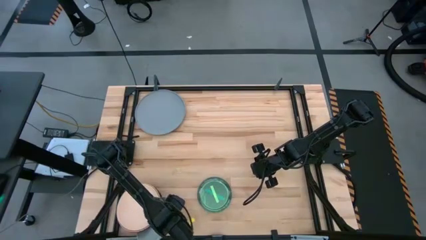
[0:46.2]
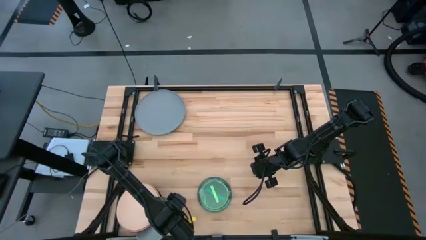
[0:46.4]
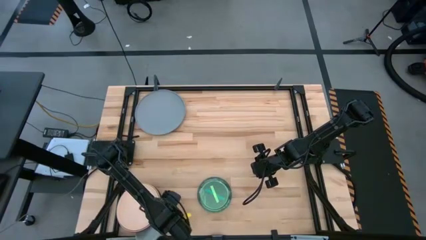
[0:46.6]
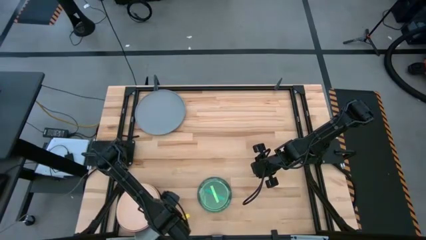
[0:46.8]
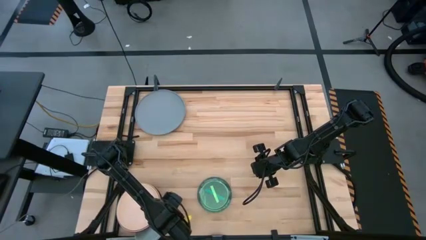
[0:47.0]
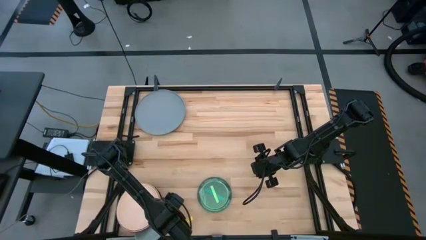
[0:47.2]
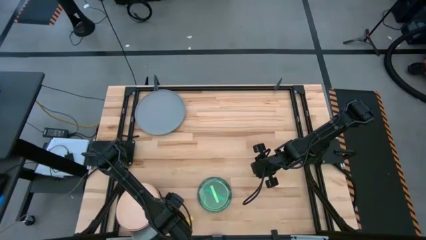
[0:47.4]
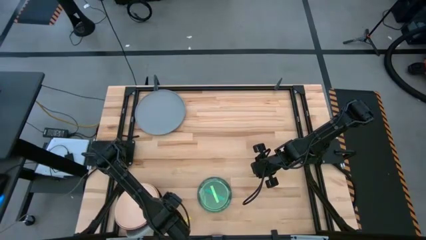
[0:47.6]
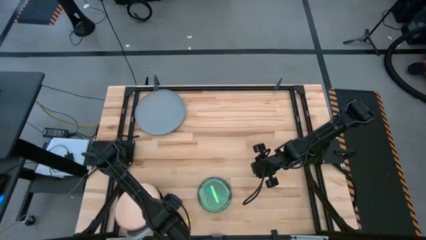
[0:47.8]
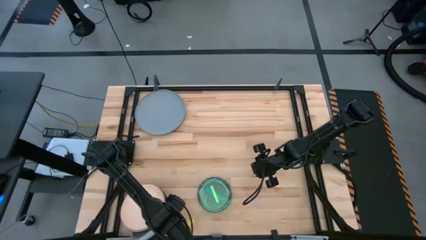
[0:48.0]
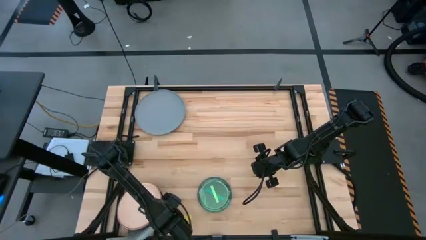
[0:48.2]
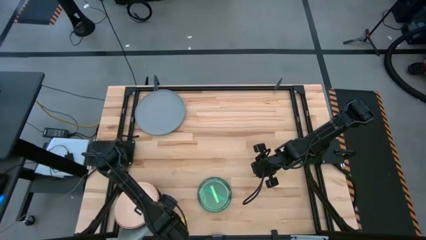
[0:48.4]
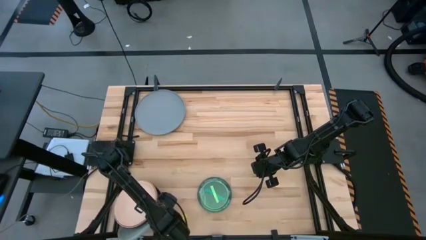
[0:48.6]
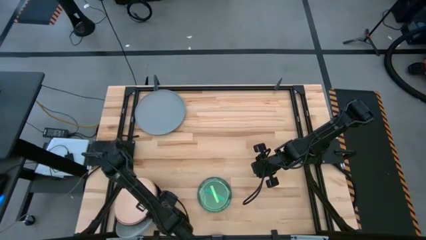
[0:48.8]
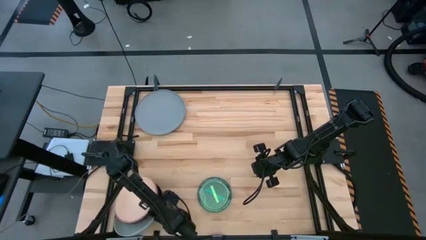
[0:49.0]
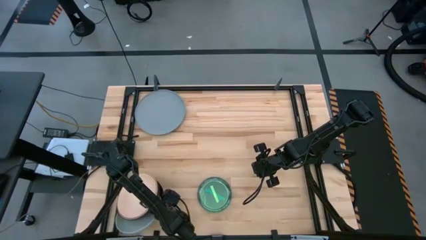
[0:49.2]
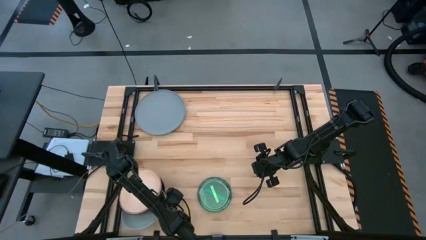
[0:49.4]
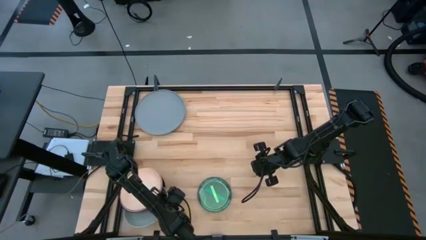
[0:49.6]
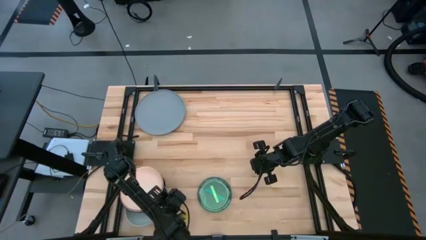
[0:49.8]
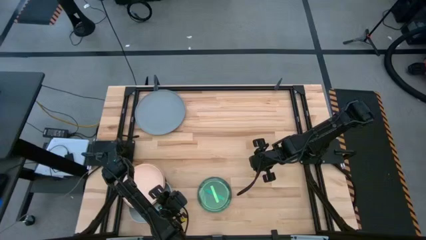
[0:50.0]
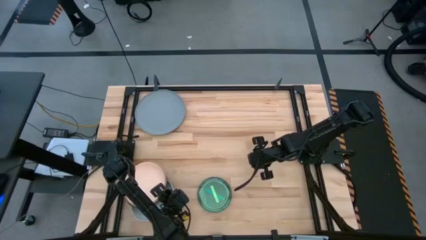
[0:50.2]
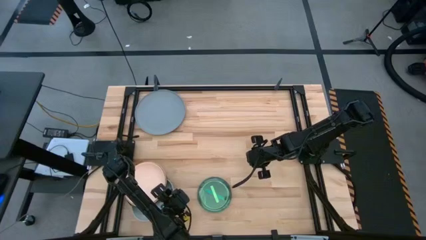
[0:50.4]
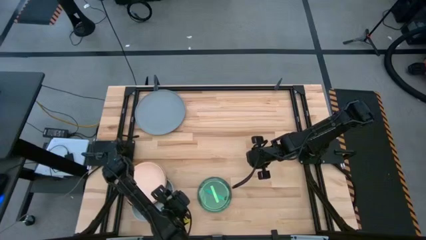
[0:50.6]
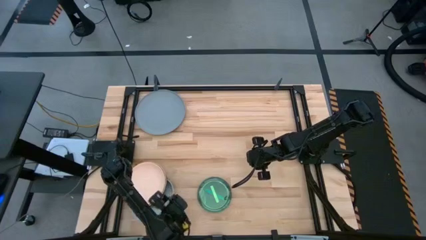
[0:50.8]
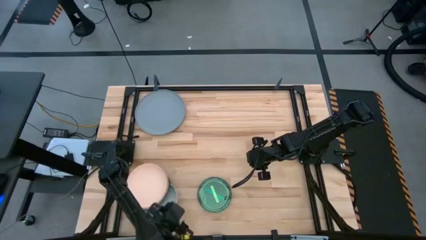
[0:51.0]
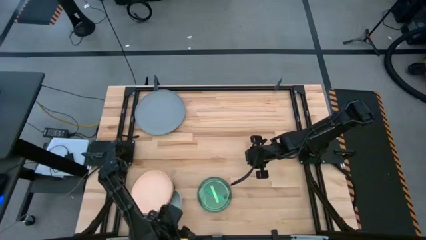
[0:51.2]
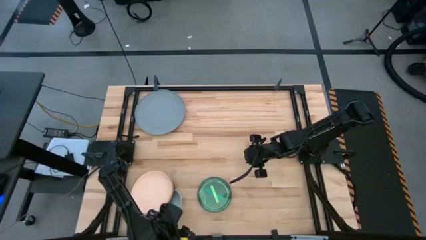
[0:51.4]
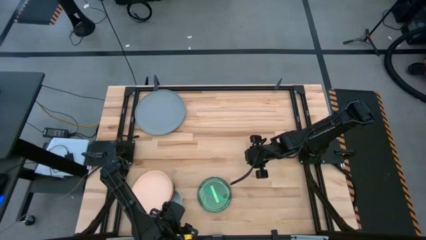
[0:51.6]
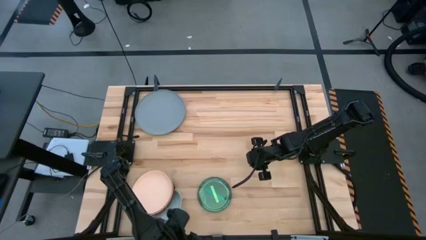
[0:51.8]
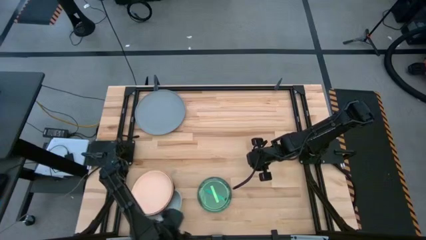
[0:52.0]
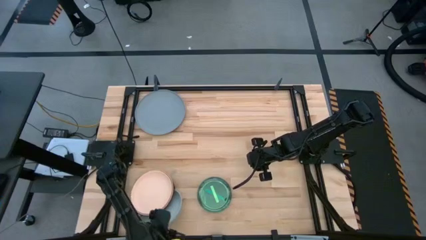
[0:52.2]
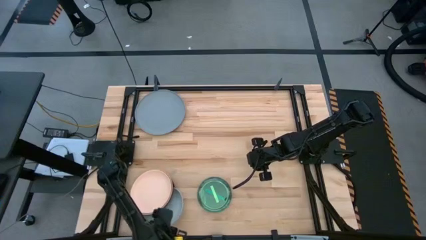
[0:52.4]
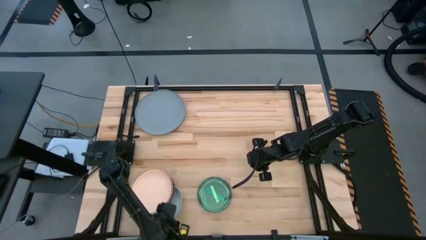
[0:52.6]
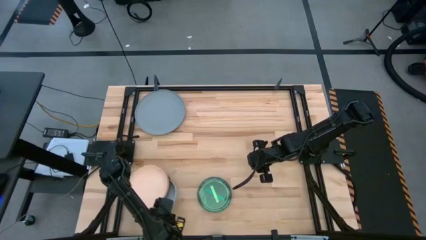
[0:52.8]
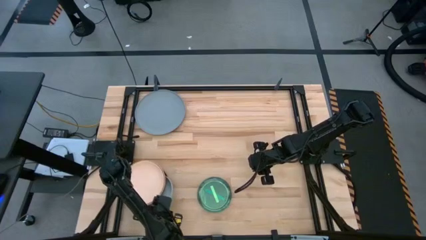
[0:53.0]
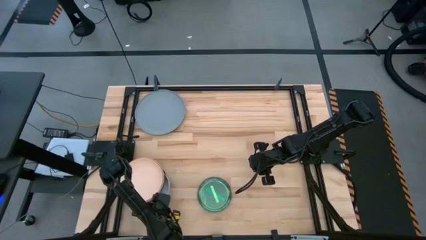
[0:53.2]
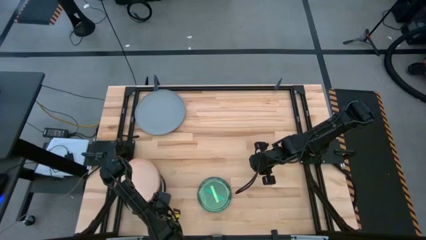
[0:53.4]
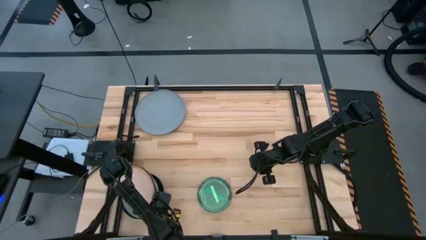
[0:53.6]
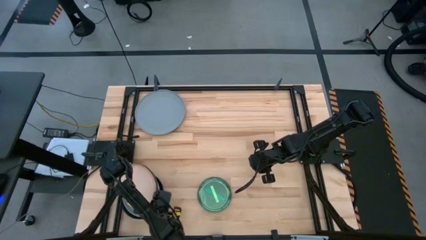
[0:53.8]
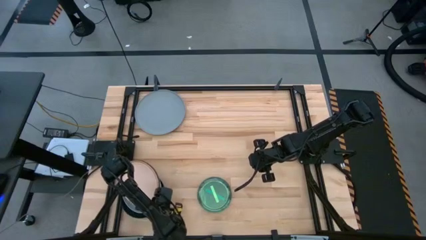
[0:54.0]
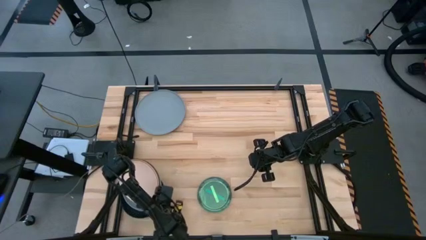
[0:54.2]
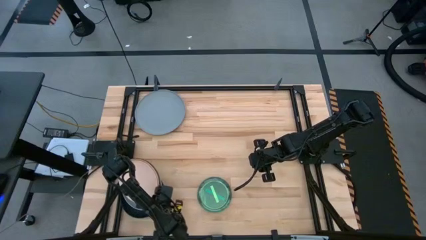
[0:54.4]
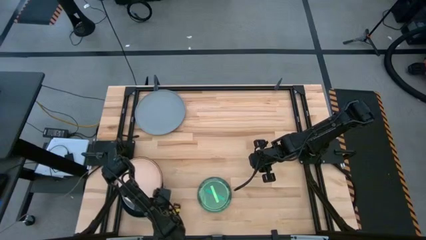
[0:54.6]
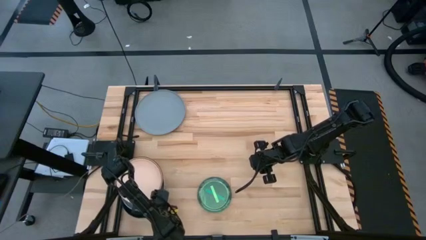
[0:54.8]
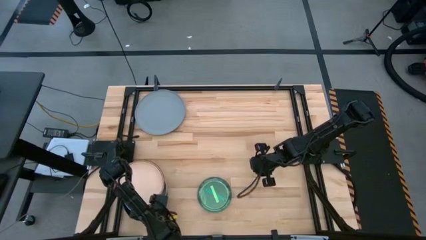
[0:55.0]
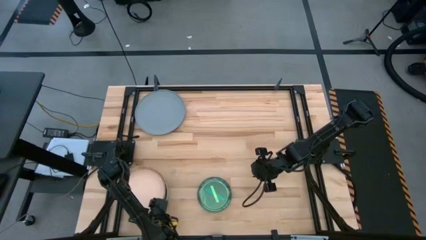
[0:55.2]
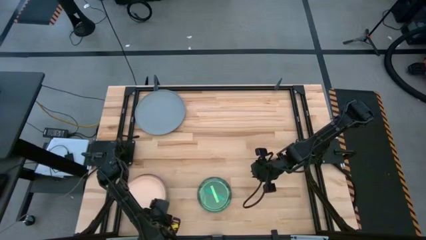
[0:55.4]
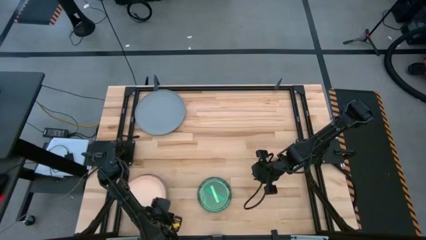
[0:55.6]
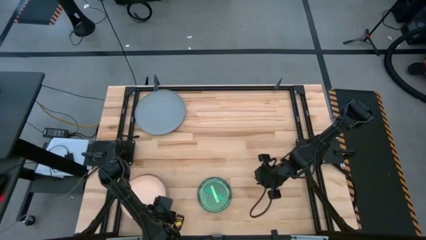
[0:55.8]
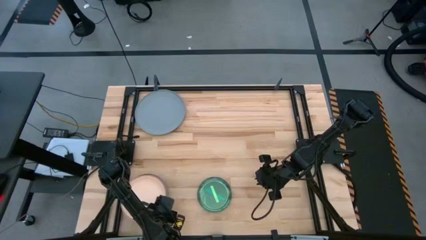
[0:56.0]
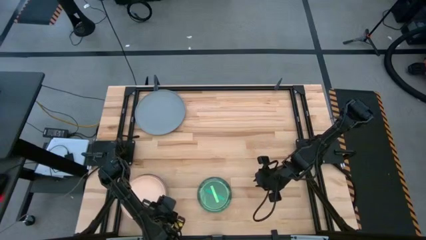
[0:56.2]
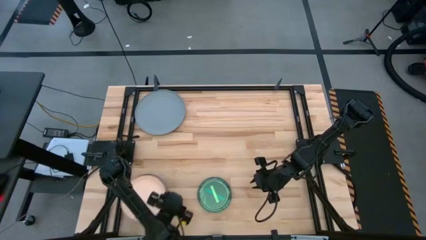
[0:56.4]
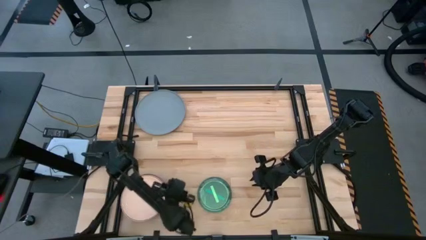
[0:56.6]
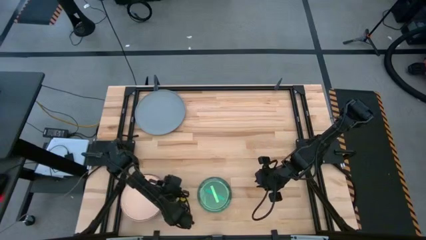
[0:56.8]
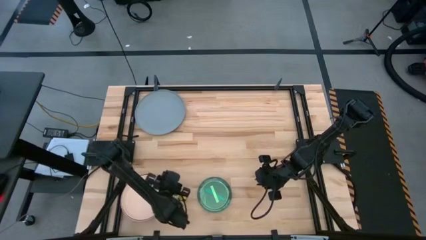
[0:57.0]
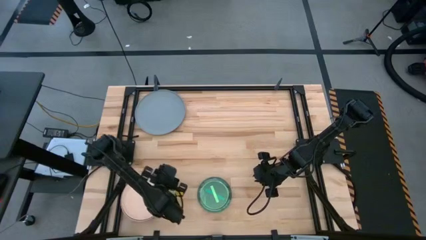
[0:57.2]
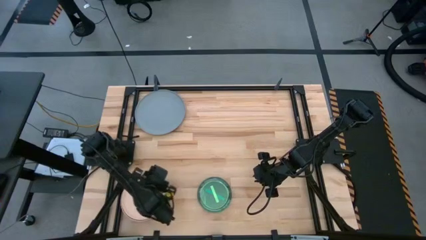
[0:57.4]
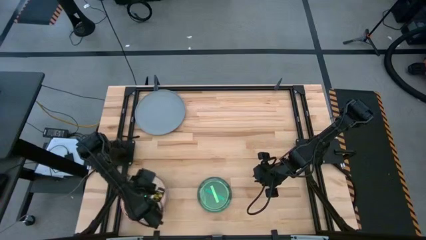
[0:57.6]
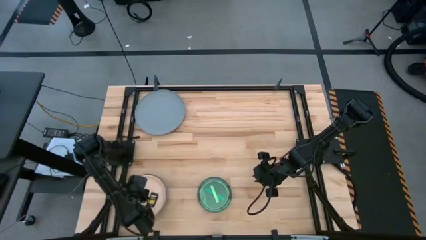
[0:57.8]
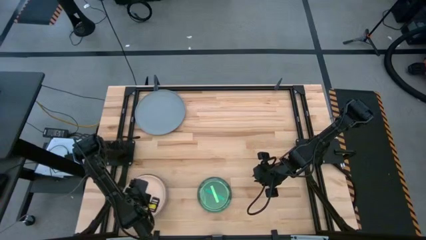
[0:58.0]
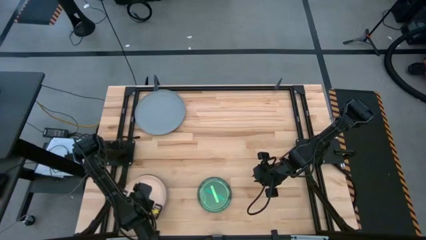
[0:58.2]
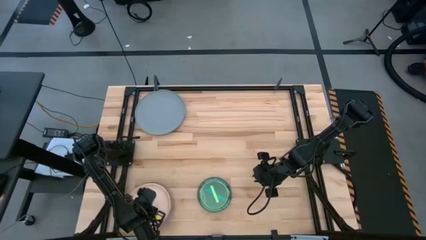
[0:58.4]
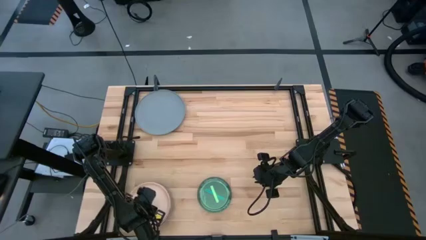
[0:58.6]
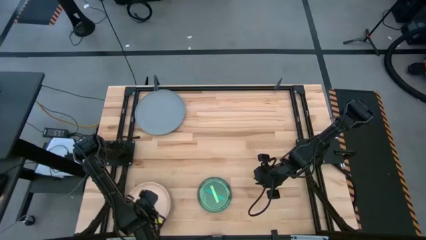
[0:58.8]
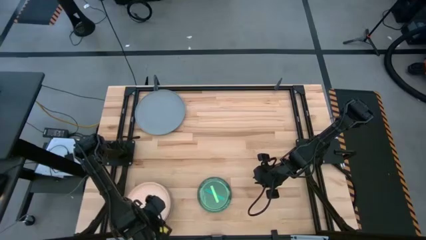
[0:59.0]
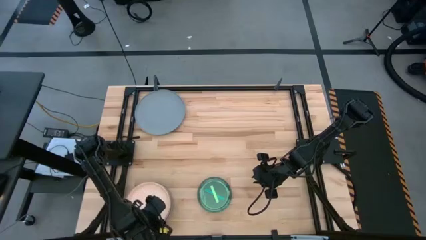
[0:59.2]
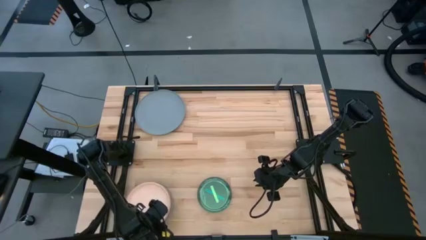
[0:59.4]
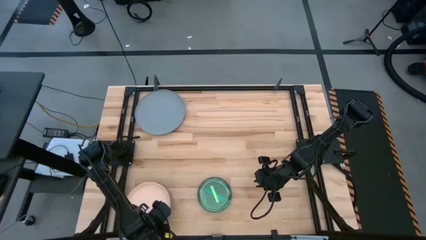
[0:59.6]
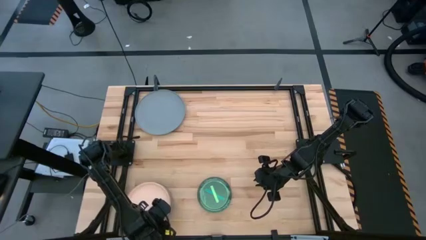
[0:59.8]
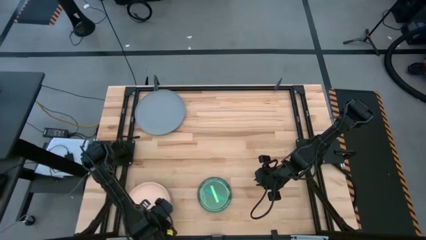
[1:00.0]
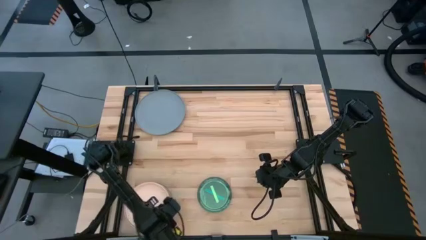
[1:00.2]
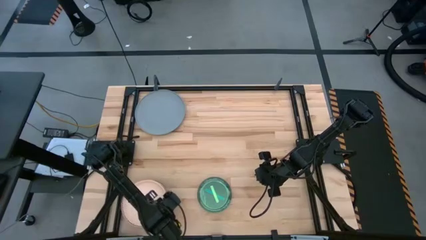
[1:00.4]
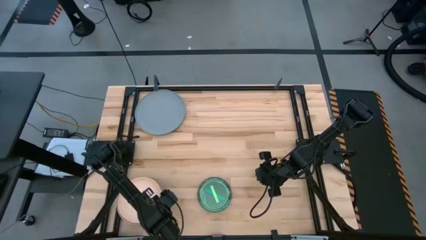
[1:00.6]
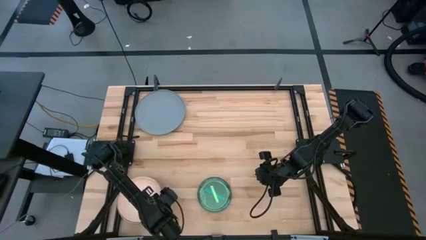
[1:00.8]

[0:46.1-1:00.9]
Task: Stack plastic plates
Stack the plates on the black plate

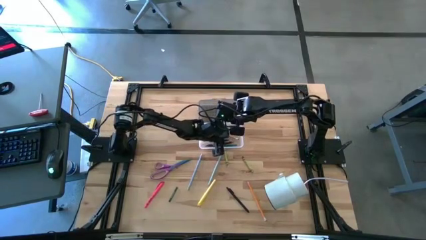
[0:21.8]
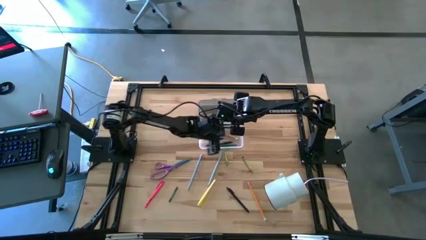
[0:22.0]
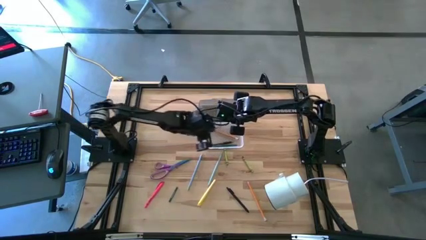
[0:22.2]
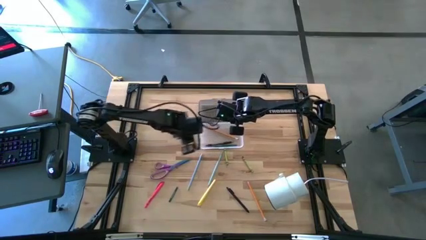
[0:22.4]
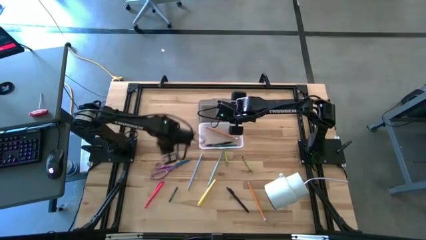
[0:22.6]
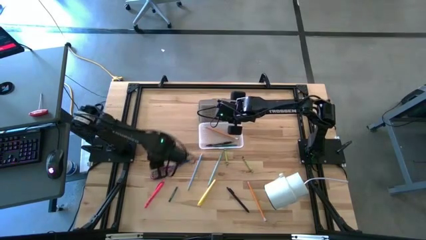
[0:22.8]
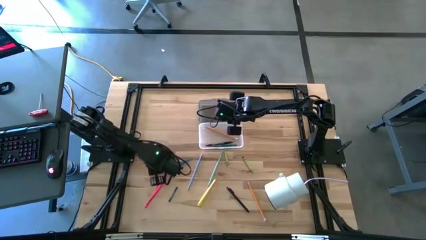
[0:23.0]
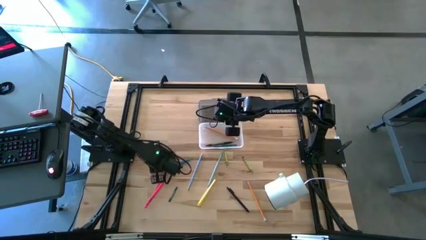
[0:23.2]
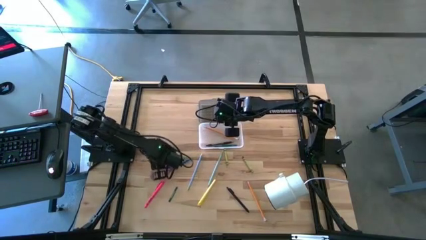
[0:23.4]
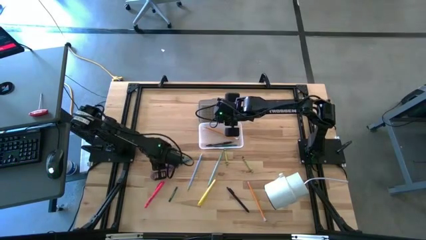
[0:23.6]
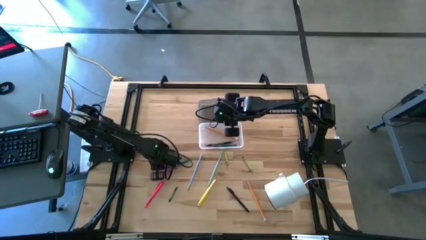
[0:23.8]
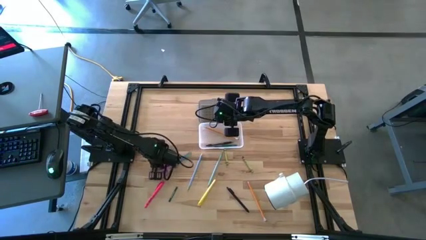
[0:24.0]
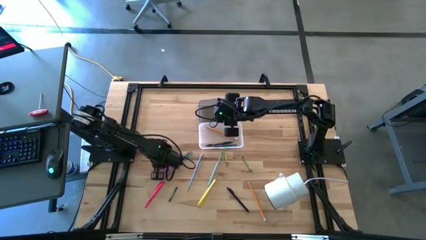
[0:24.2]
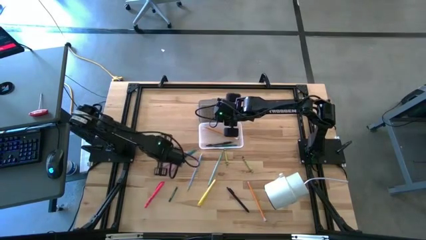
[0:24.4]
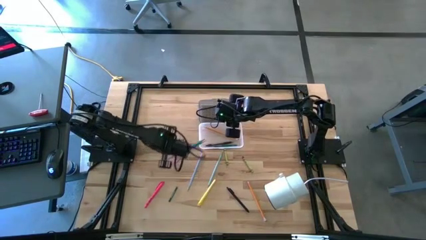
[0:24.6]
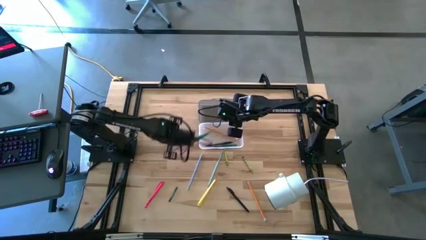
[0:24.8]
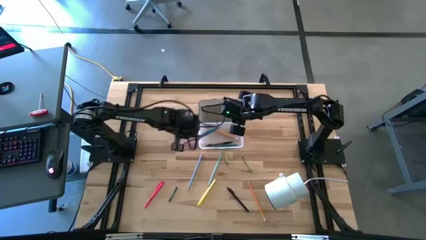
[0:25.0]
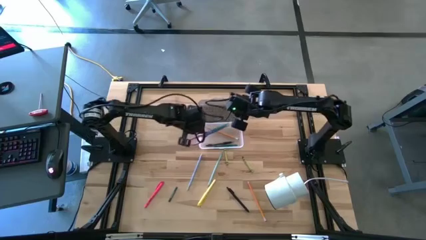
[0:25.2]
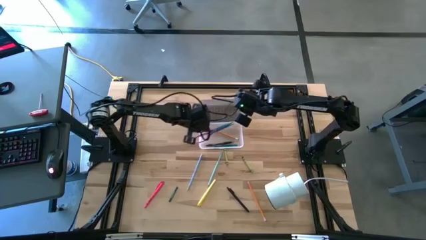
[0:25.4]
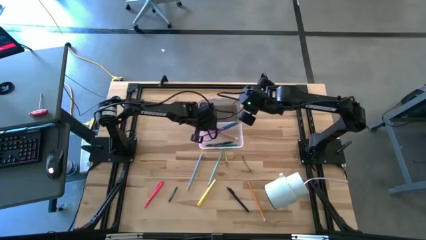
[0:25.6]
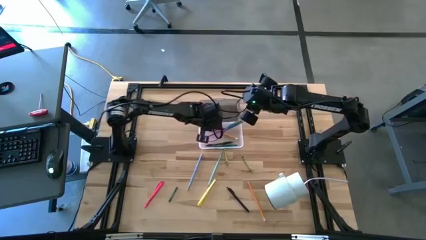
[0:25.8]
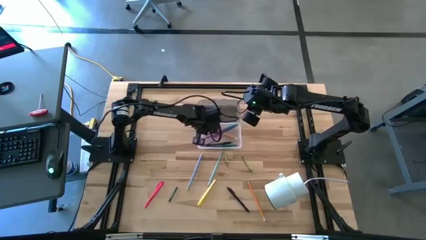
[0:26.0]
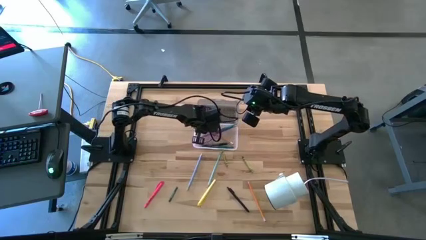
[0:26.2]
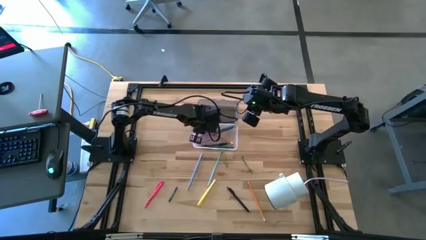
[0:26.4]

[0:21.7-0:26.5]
Task: Pick & place school supplies into a supply box
Put the purple scissors into the black supply box
